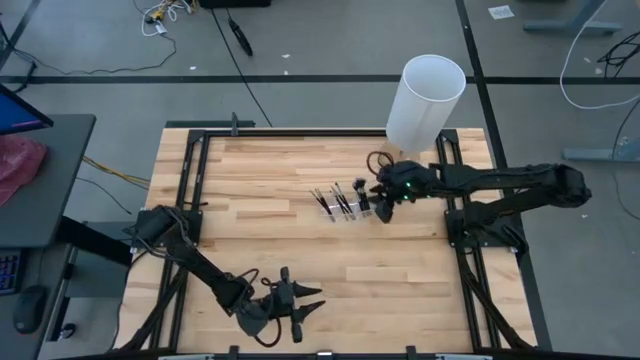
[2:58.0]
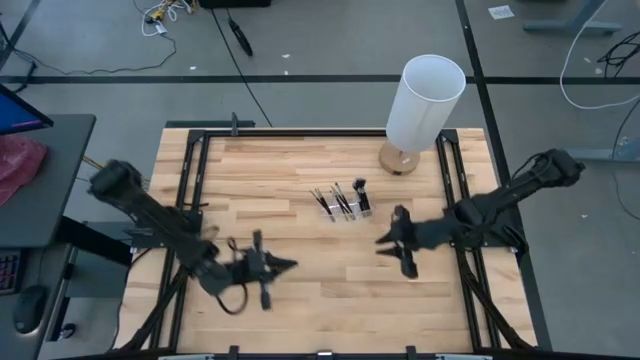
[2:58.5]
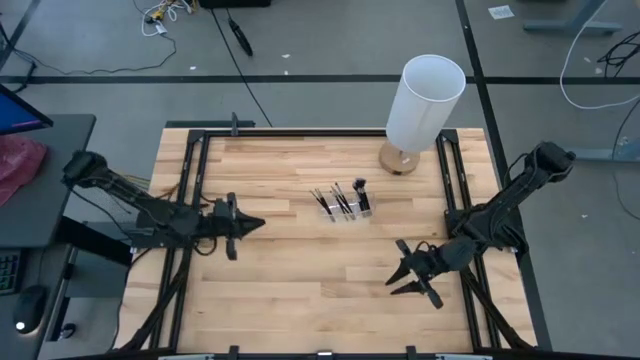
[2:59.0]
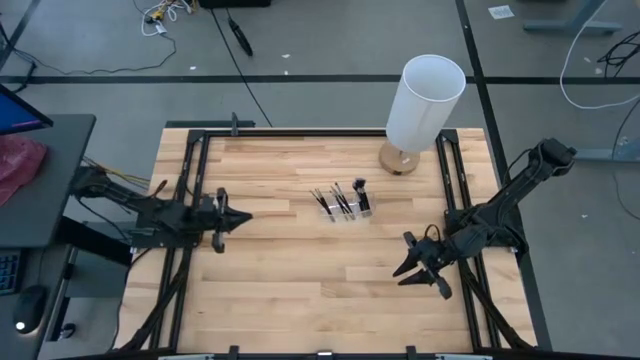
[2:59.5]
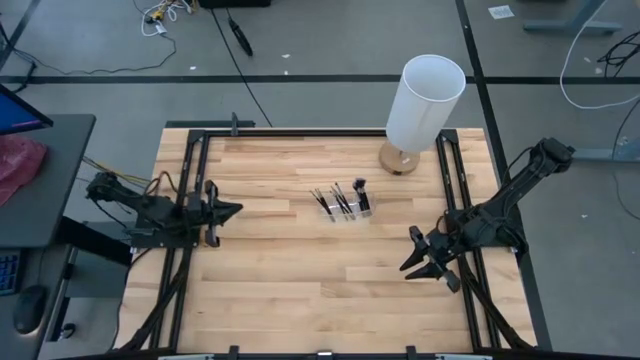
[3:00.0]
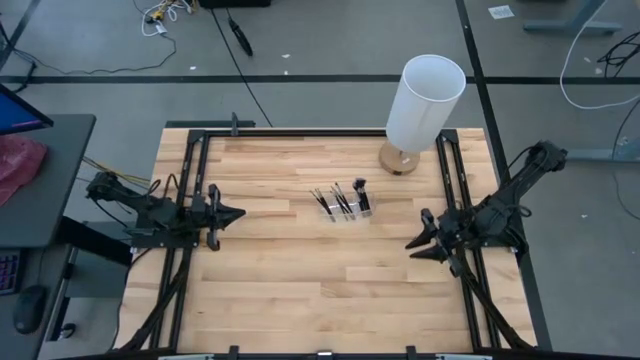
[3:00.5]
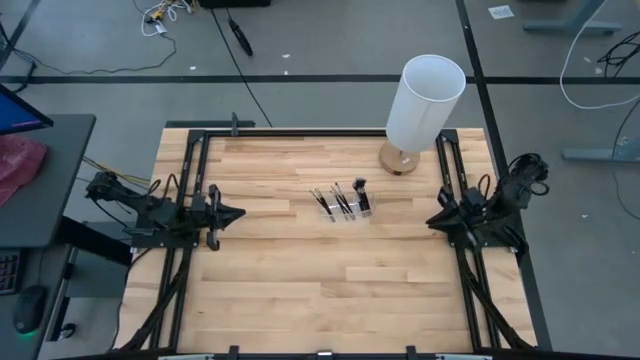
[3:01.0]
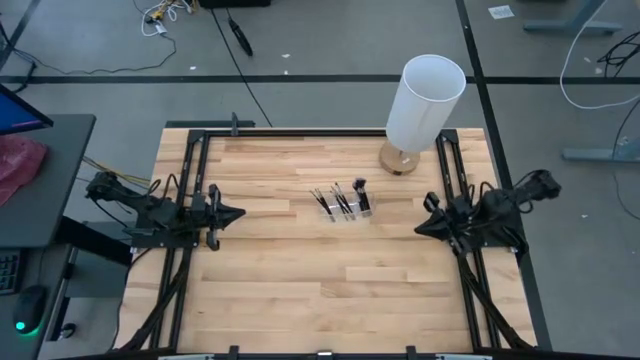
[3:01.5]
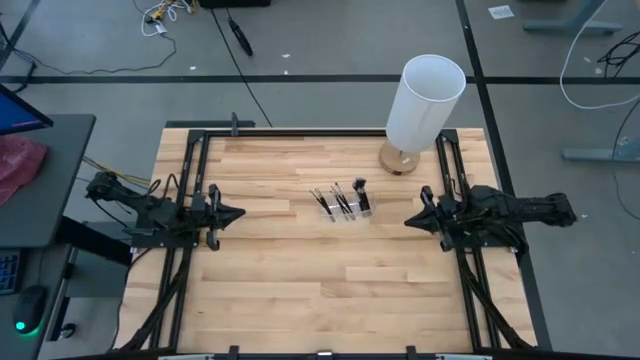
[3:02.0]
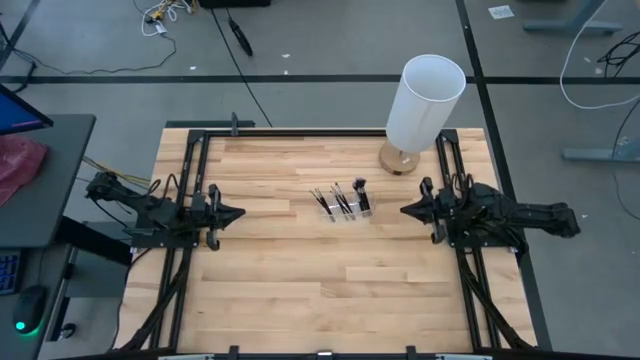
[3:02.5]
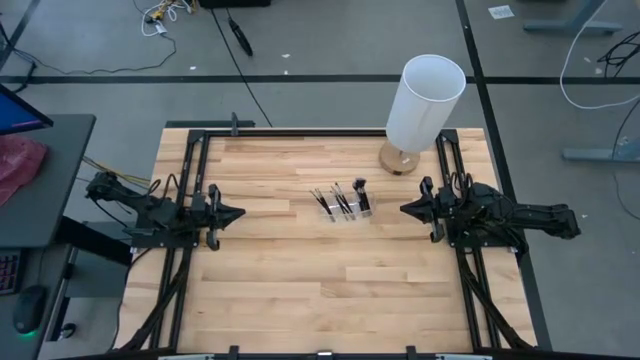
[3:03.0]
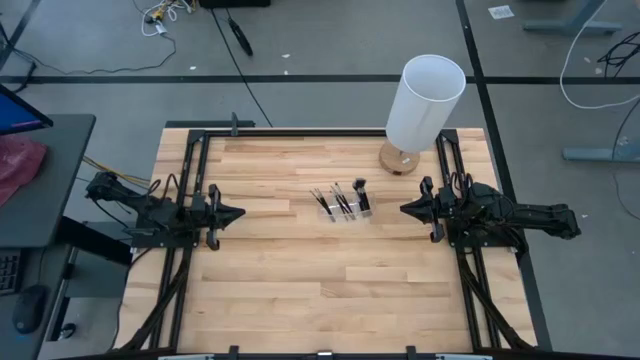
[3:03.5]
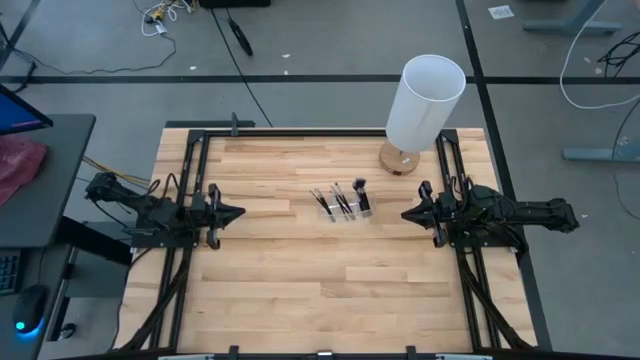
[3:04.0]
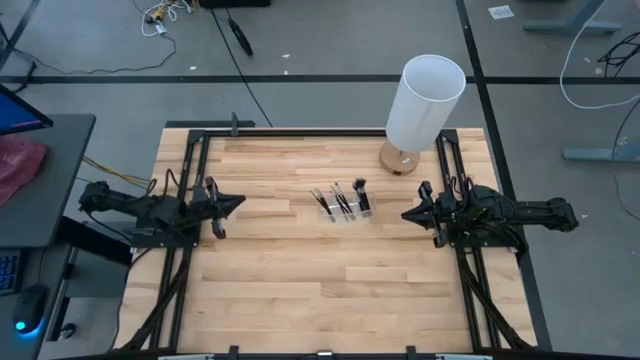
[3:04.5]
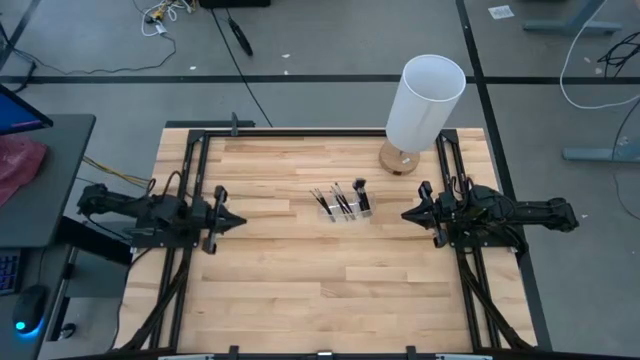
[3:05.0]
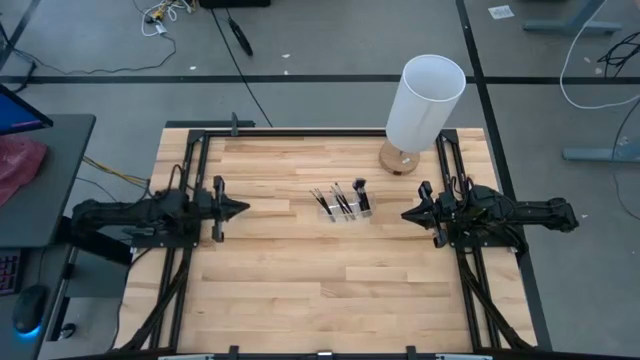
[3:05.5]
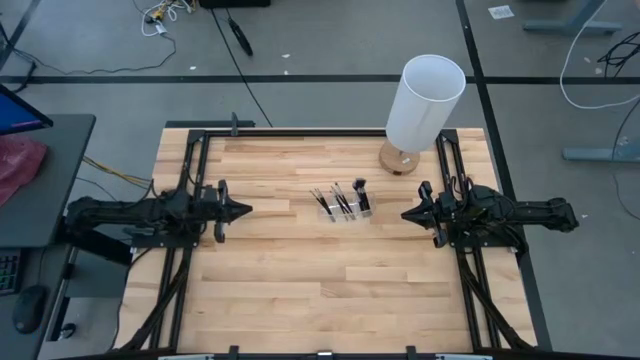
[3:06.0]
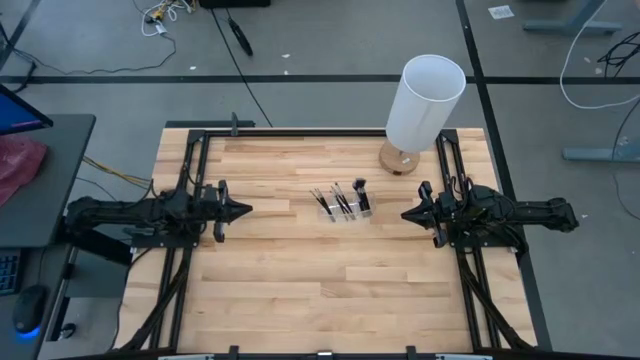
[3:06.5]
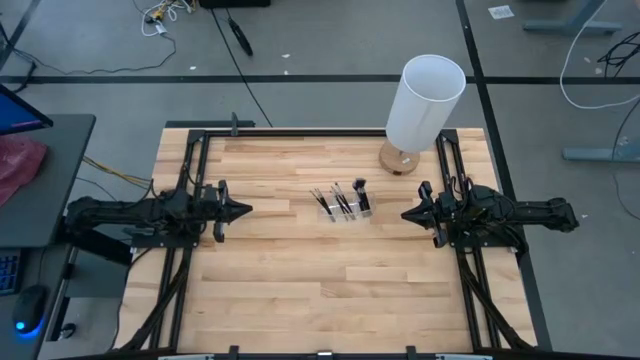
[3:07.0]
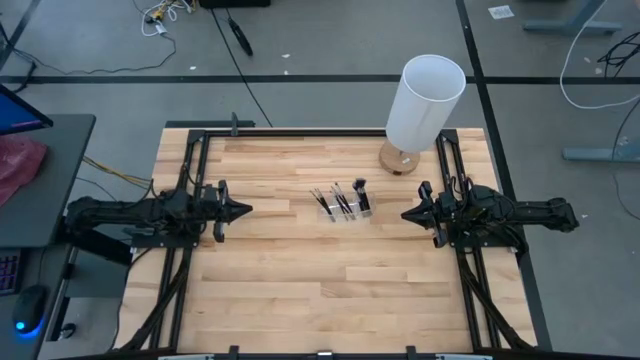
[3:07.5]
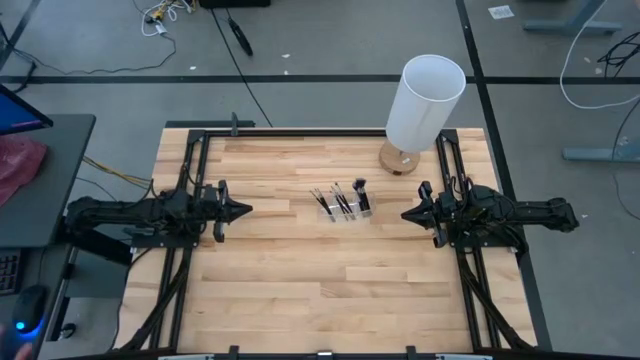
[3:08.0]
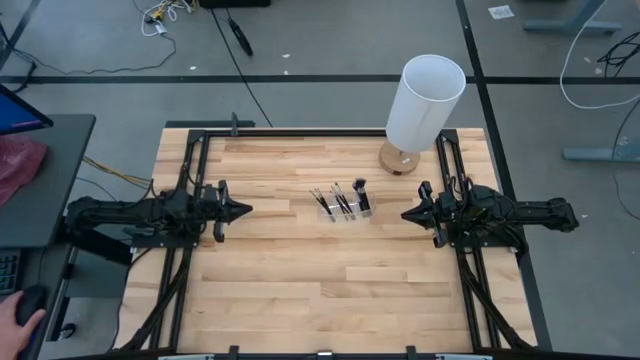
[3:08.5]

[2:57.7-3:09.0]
Task: Pick & Place Makeup Supplies
Return to Home Position

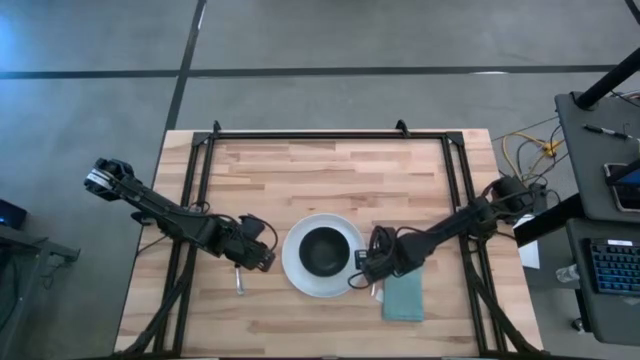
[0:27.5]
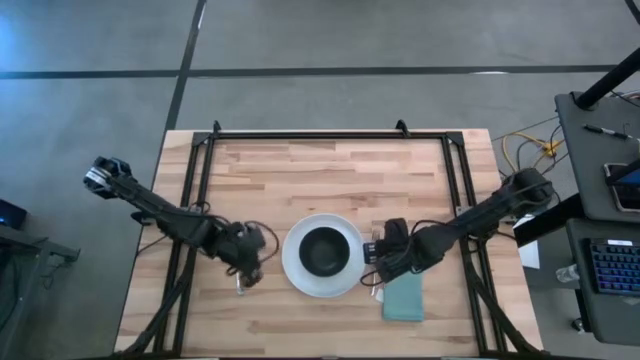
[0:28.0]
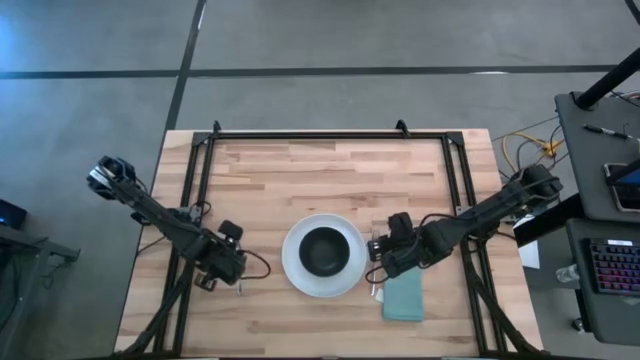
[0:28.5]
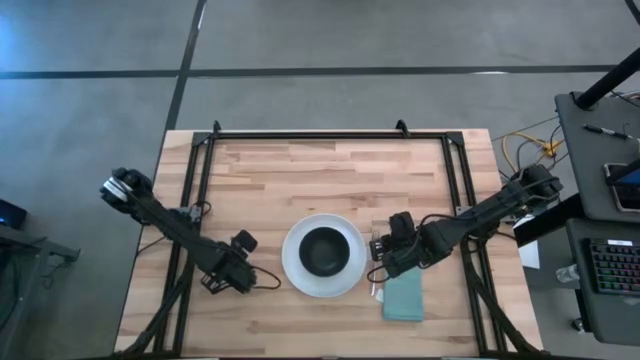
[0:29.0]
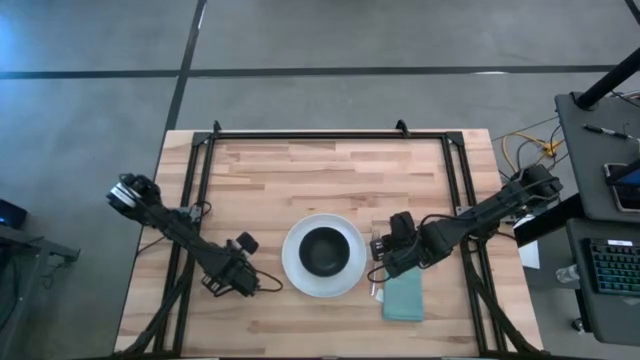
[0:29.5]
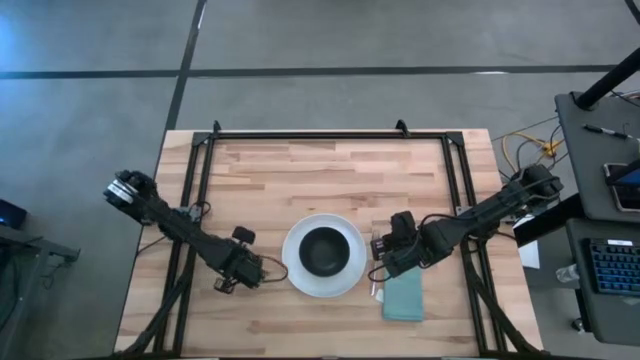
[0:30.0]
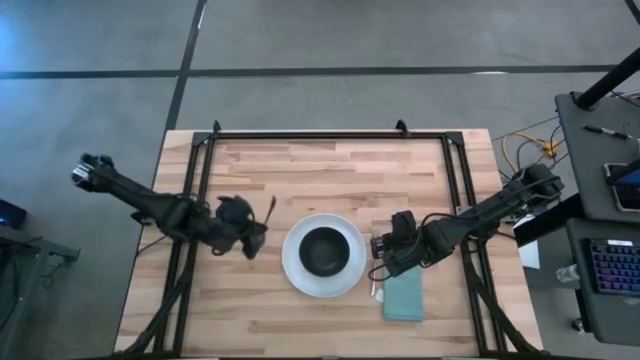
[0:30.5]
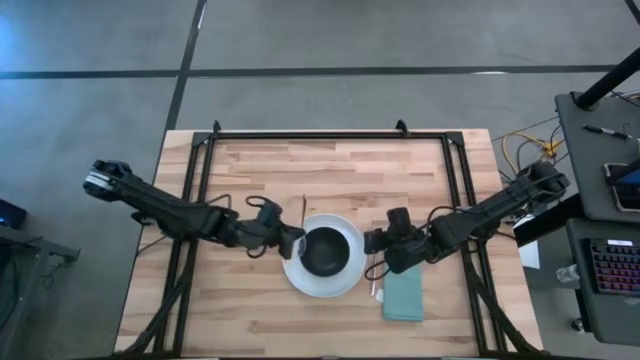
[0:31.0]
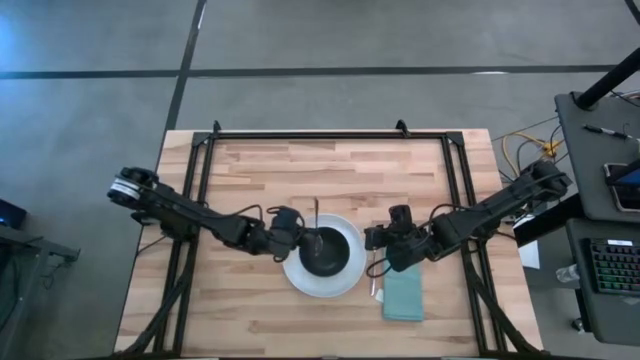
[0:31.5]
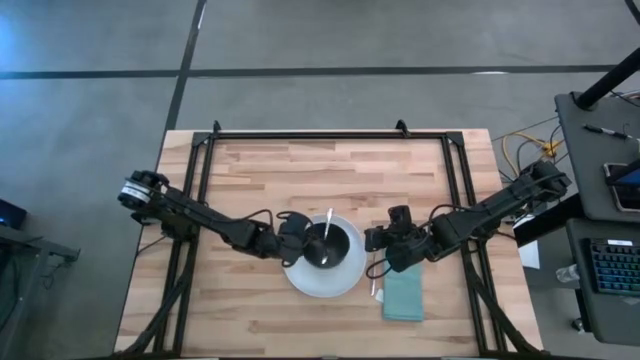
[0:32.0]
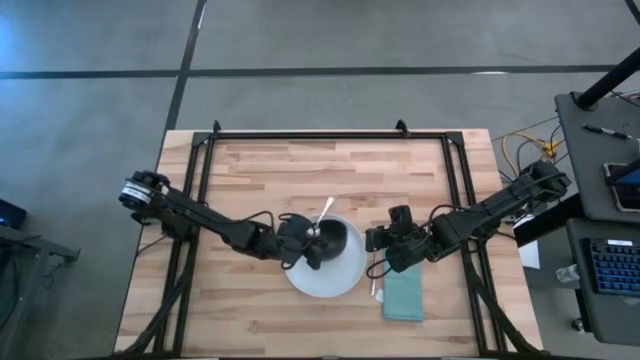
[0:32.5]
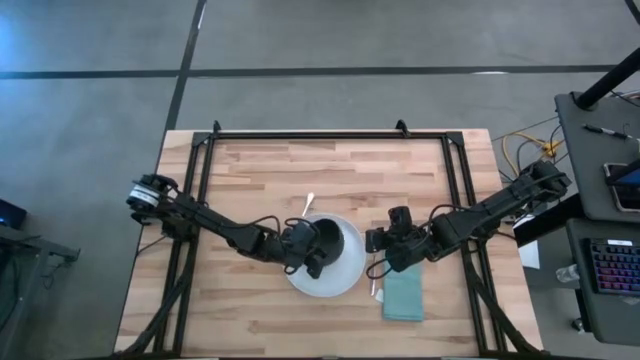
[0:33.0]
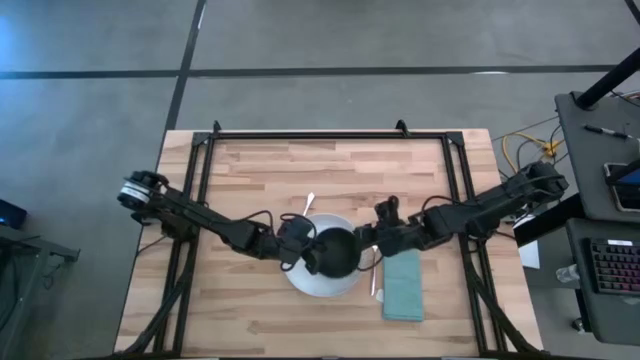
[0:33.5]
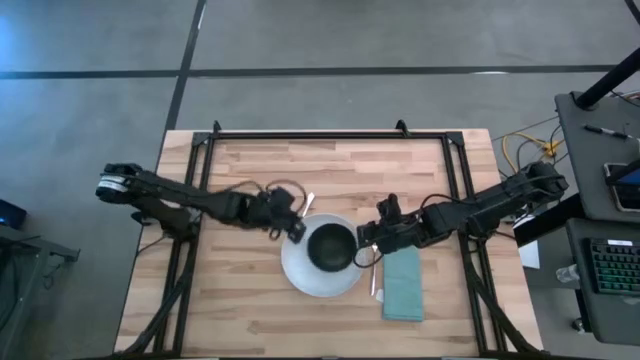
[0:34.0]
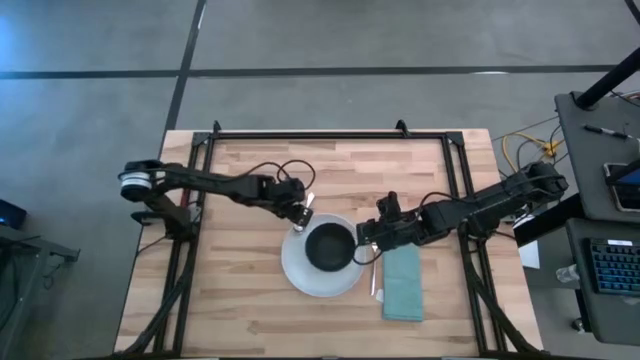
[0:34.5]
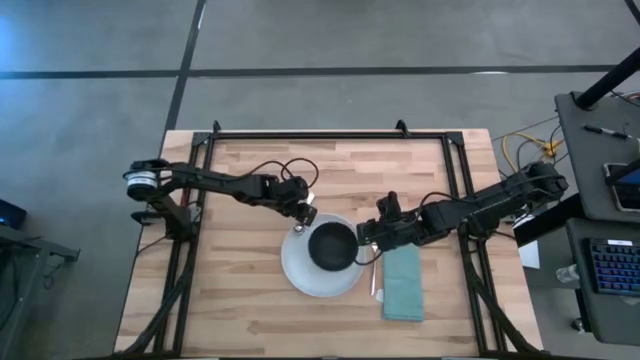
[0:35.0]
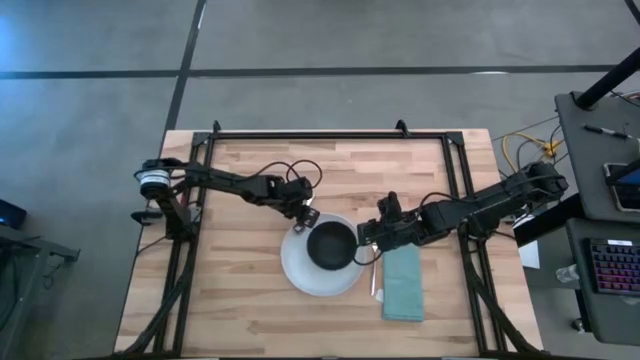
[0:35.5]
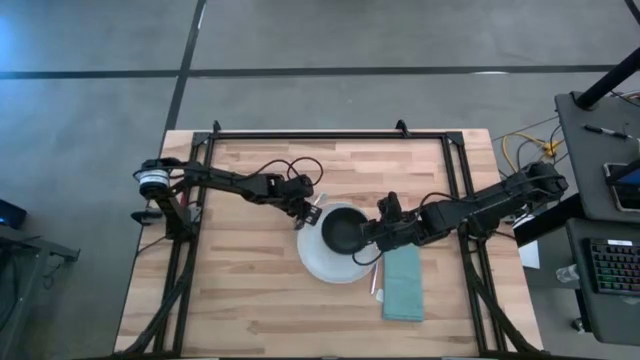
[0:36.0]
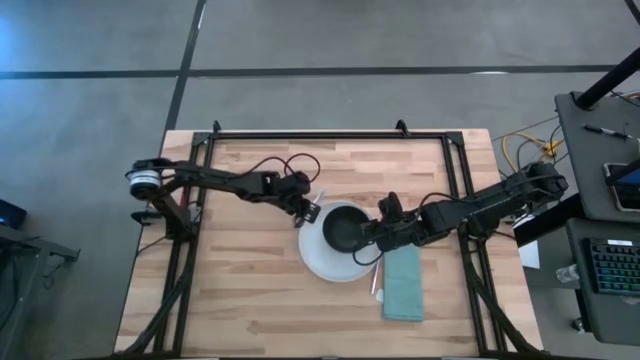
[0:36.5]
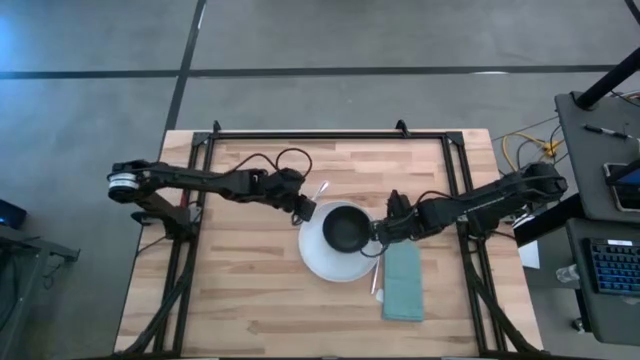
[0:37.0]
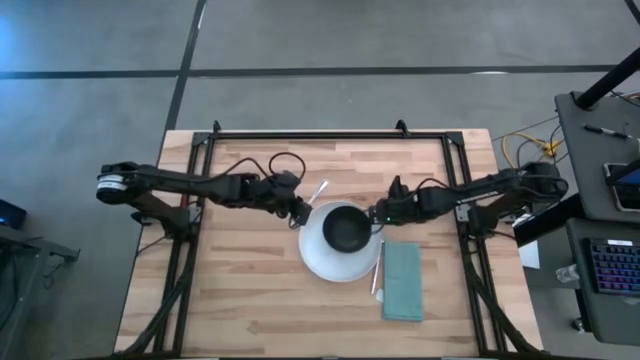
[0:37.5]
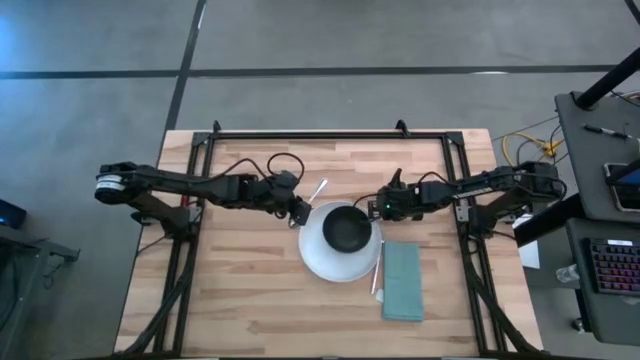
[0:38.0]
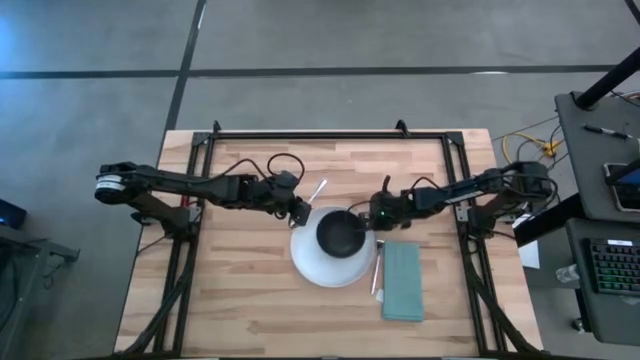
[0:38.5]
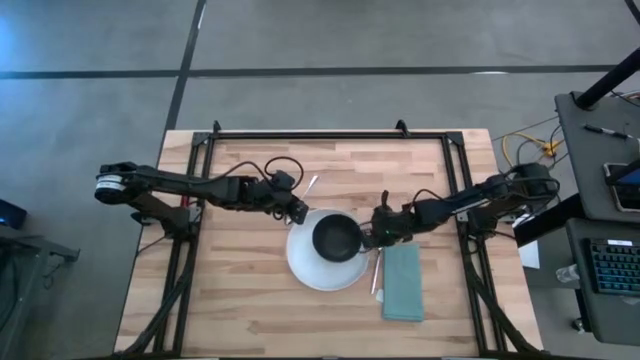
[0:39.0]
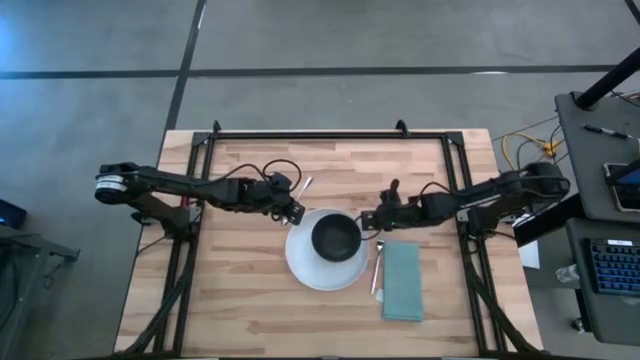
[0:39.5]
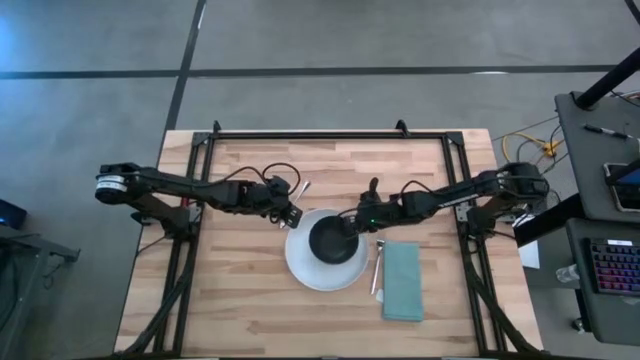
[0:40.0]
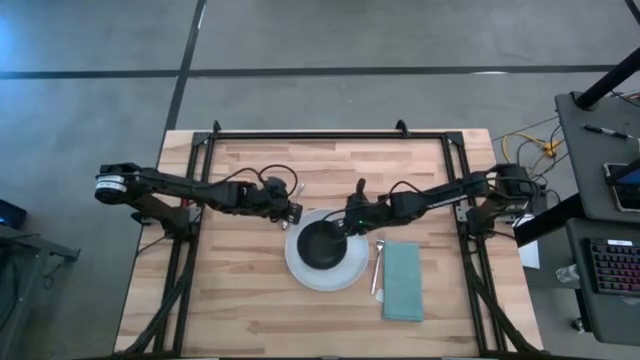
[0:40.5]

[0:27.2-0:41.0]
Task: Set table place
Put the silver spoon into the black bowl
